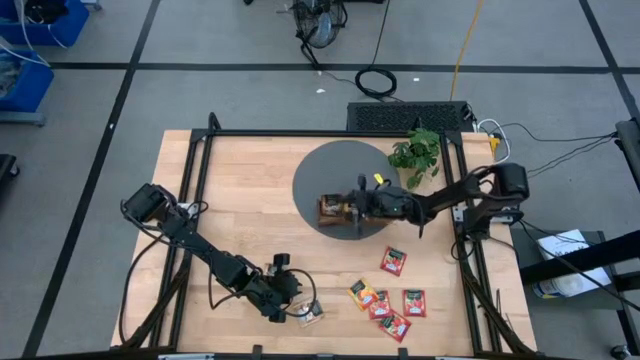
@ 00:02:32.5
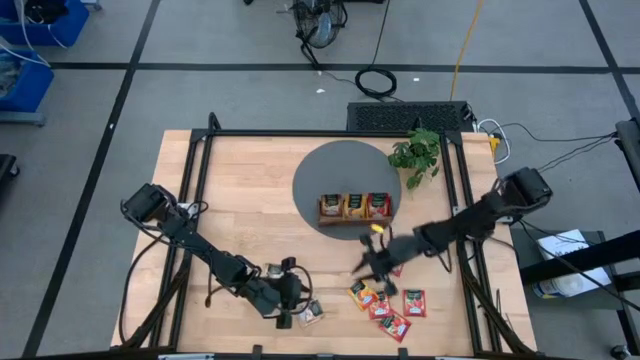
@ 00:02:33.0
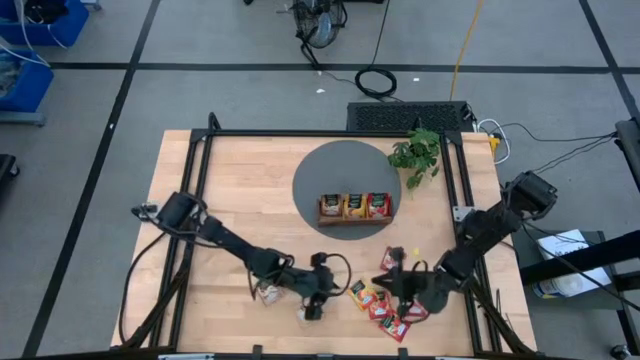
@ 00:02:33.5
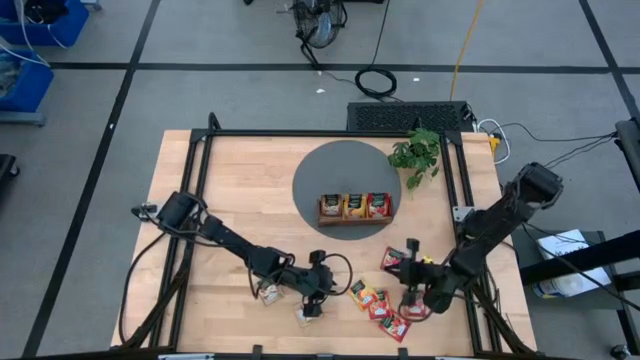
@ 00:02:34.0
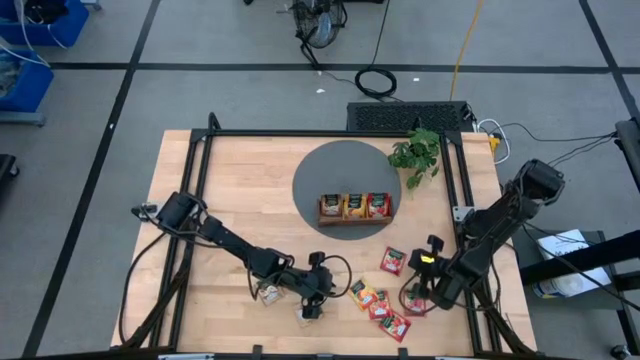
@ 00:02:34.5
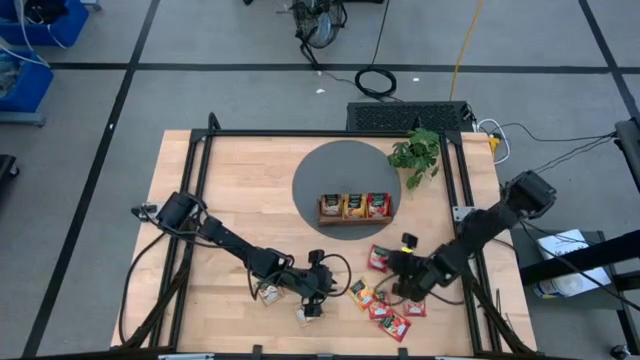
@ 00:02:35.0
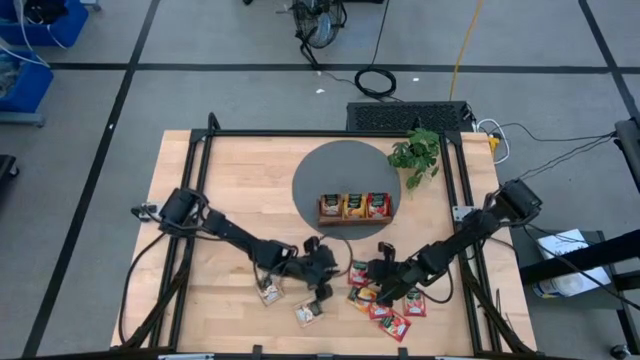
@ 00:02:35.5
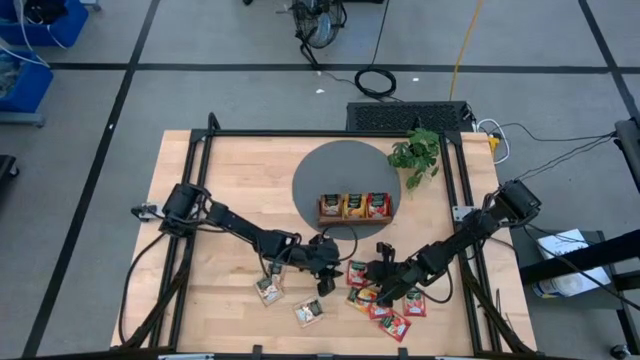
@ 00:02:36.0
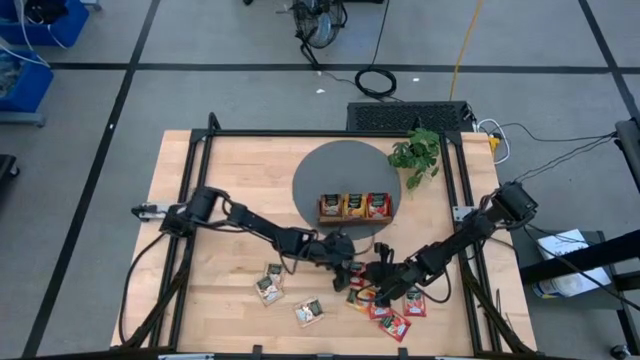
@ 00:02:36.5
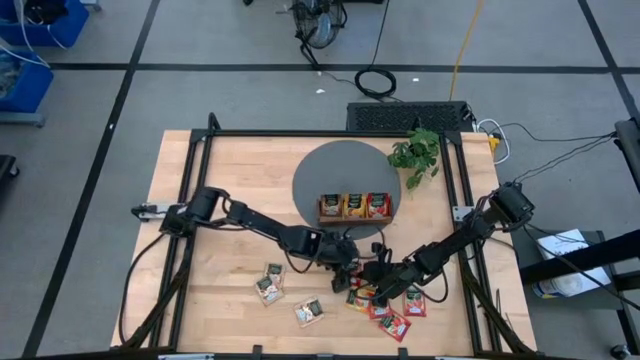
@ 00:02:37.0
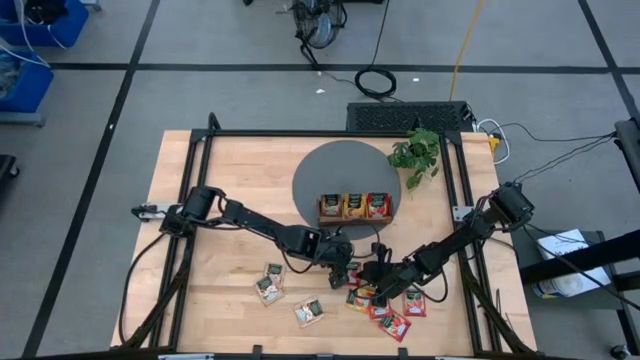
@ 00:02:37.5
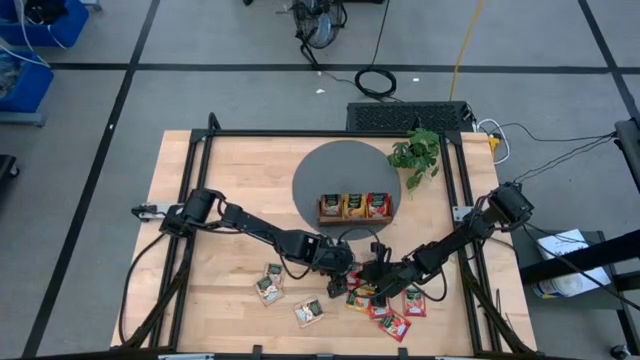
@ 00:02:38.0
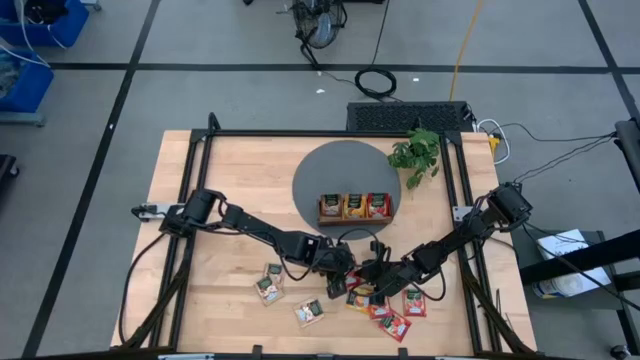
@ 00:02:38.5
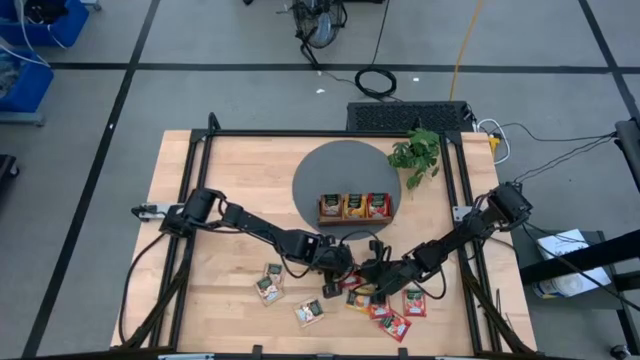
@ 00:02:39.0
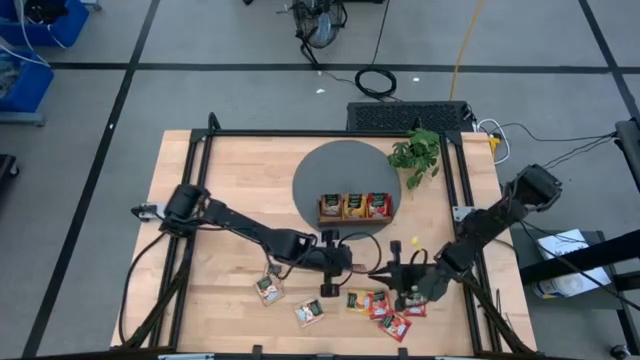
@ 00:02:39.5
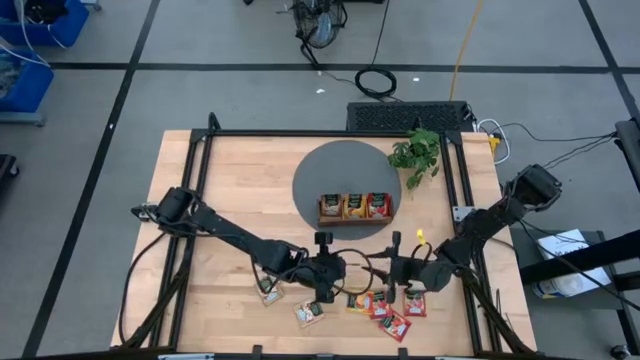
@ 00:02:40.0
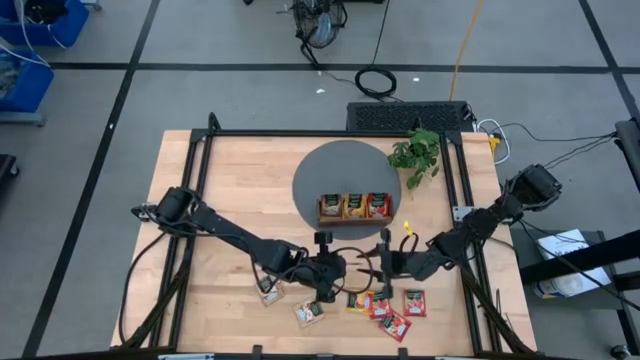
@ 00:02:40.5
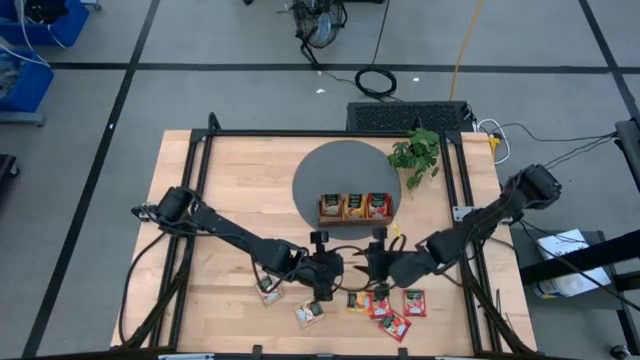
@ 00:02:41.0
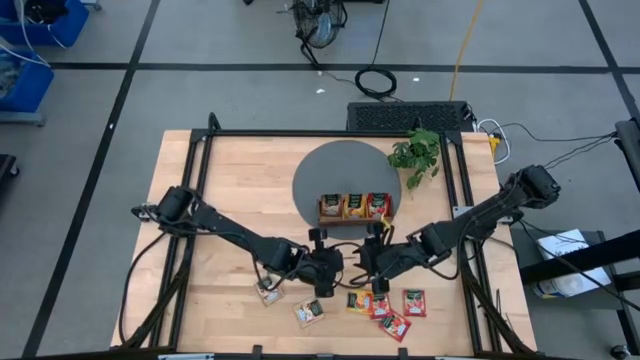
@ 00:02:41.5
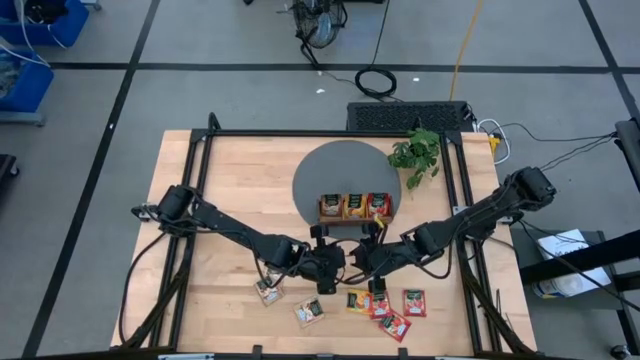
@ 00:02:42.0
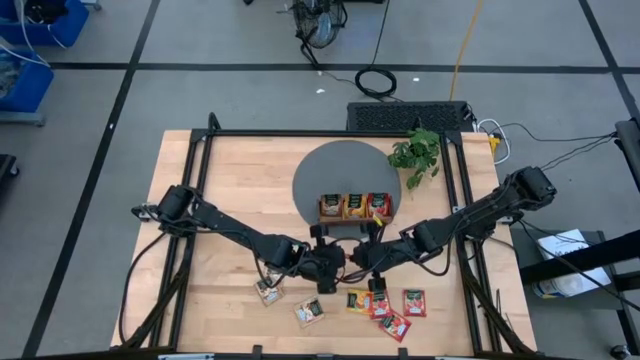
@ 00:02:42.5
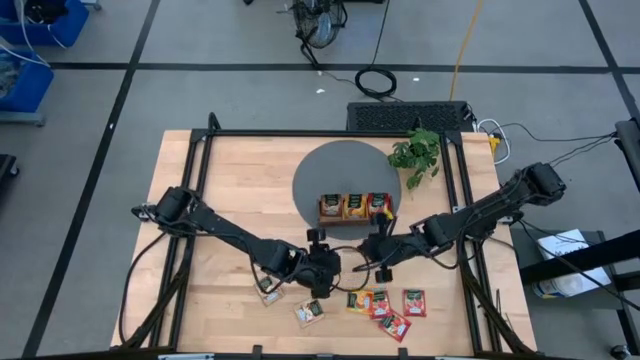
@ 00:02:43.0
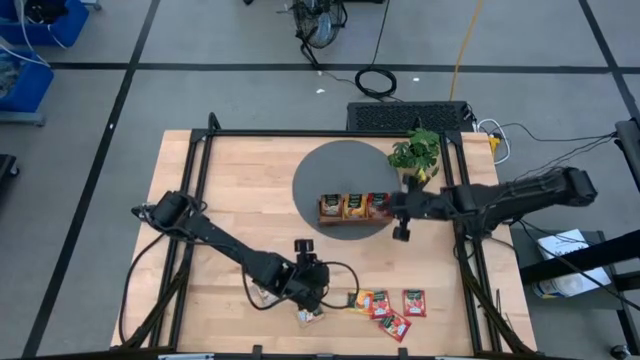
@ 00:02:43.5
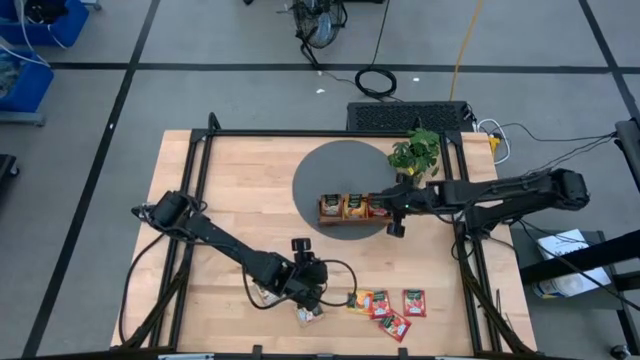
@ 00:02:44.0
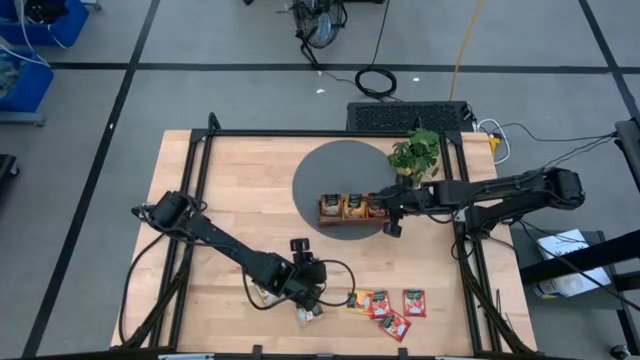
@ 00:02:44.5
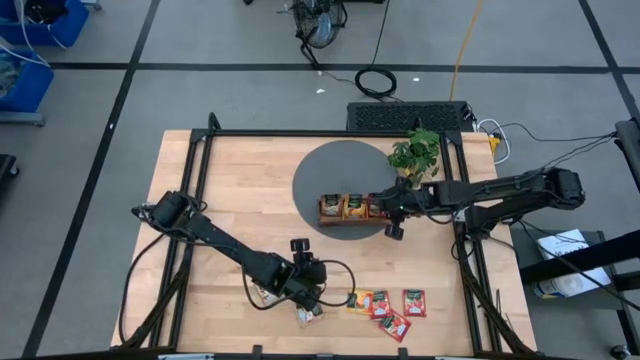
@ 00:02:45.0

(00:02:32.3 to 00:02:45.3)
Task: Pick & Place Tea
Put the red tea bag into the right section of the wooden organizer

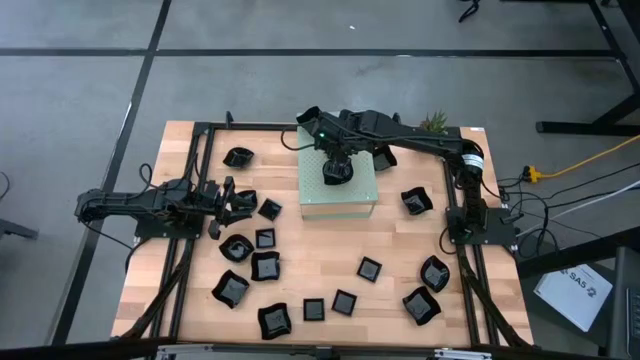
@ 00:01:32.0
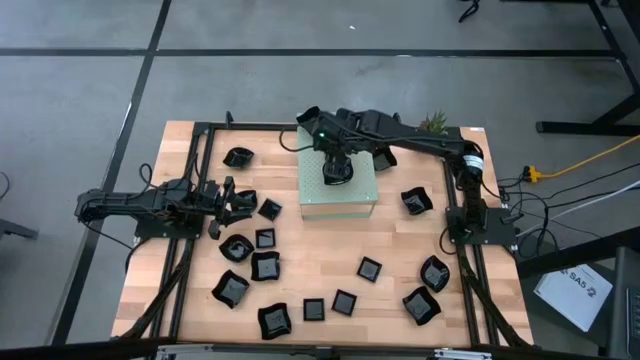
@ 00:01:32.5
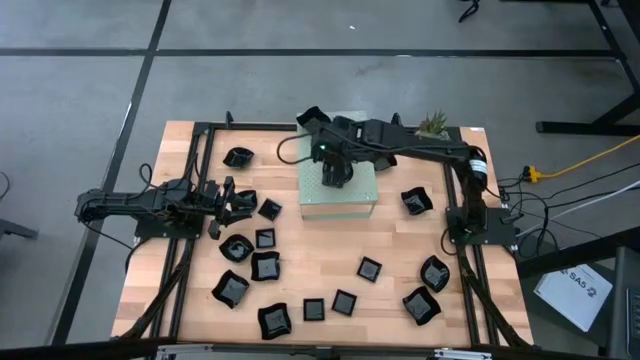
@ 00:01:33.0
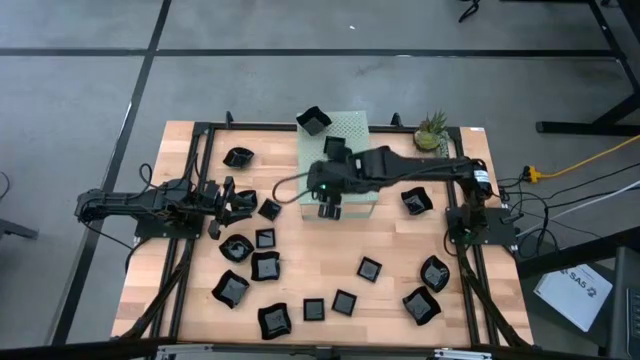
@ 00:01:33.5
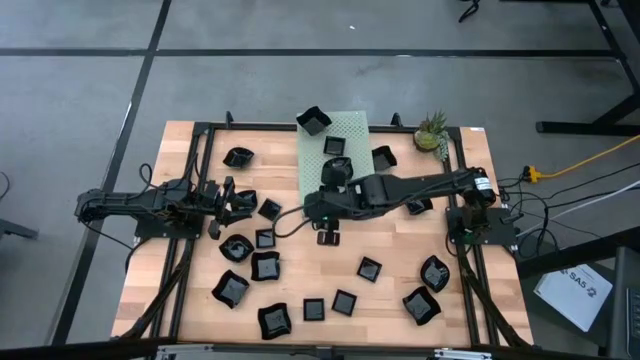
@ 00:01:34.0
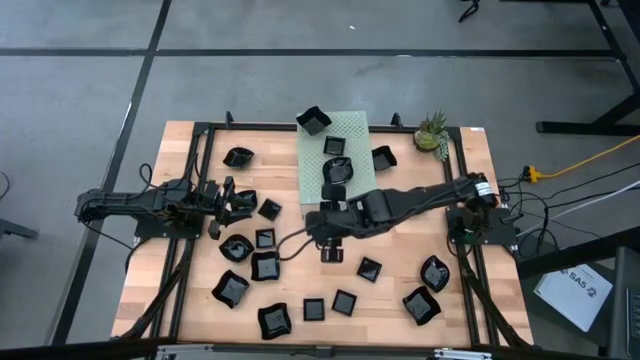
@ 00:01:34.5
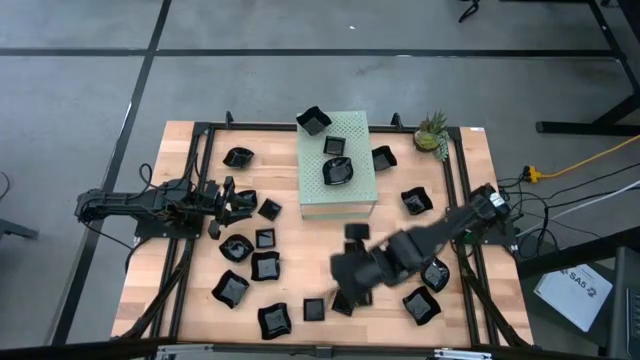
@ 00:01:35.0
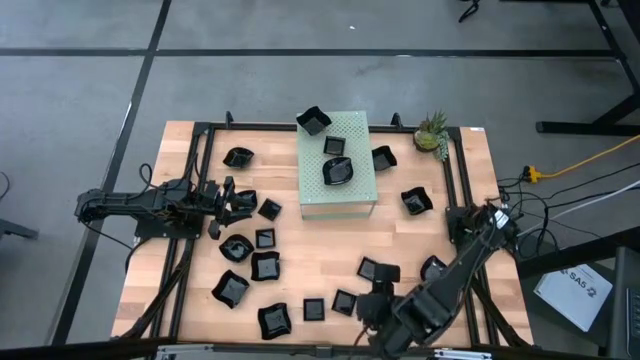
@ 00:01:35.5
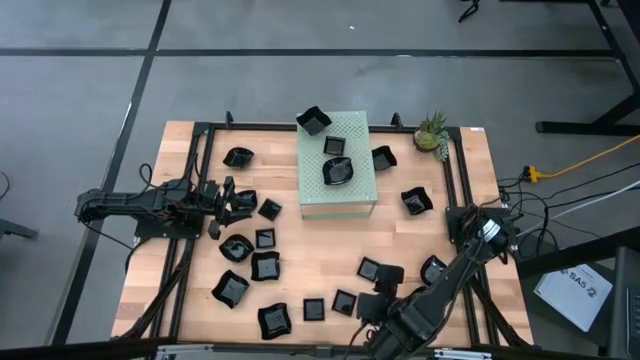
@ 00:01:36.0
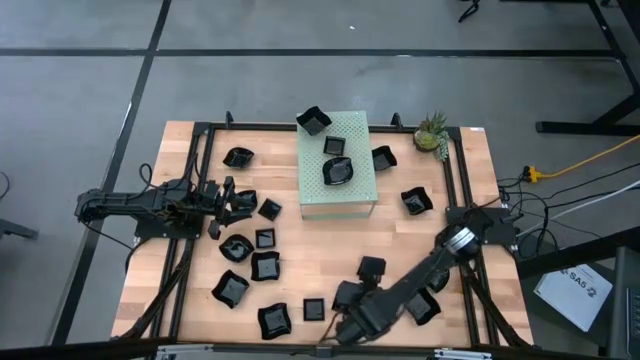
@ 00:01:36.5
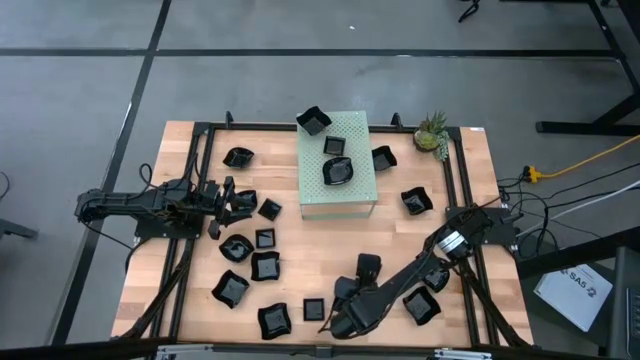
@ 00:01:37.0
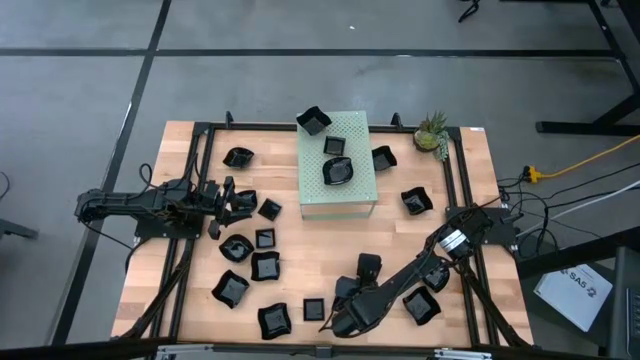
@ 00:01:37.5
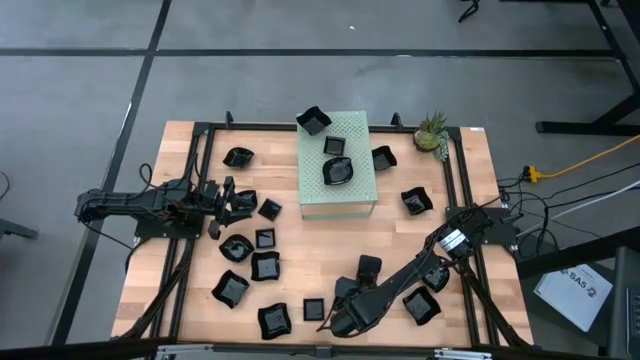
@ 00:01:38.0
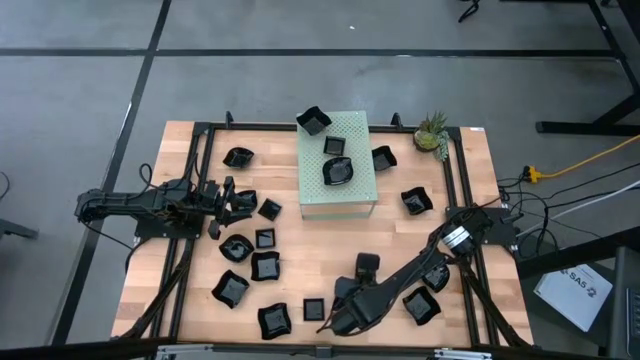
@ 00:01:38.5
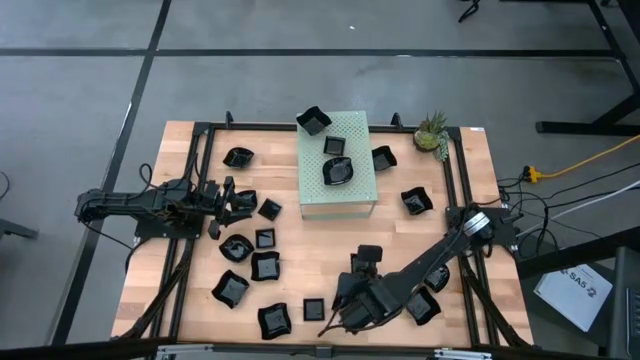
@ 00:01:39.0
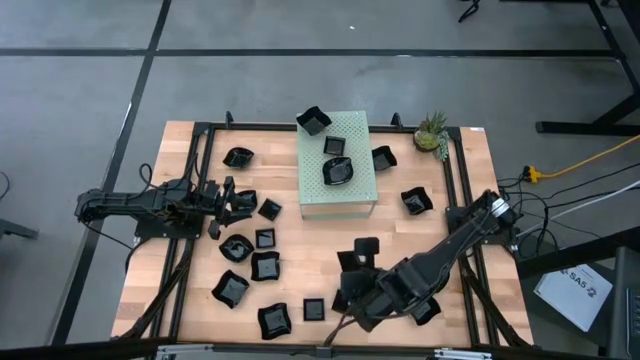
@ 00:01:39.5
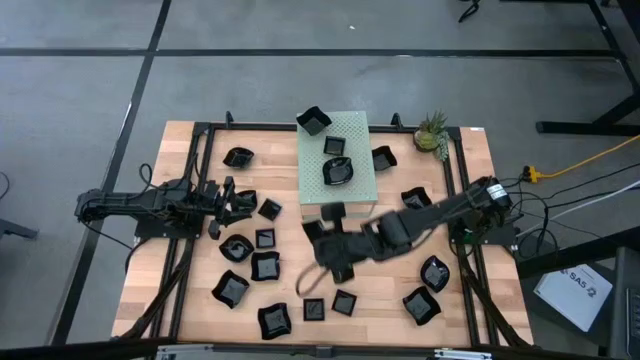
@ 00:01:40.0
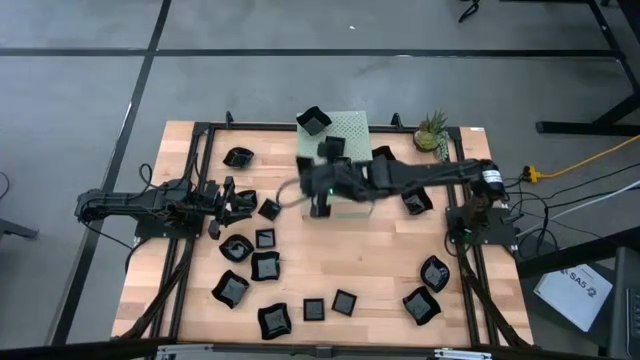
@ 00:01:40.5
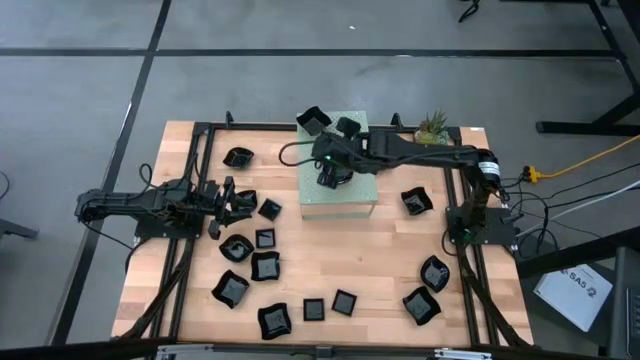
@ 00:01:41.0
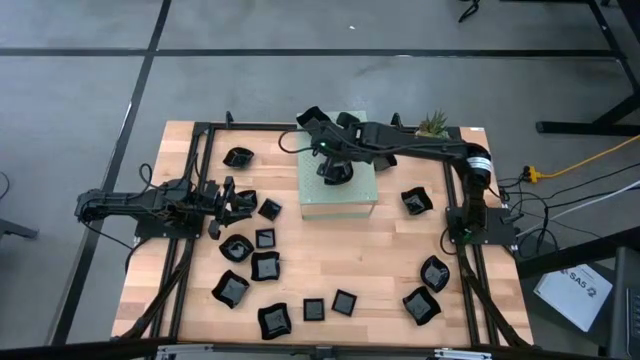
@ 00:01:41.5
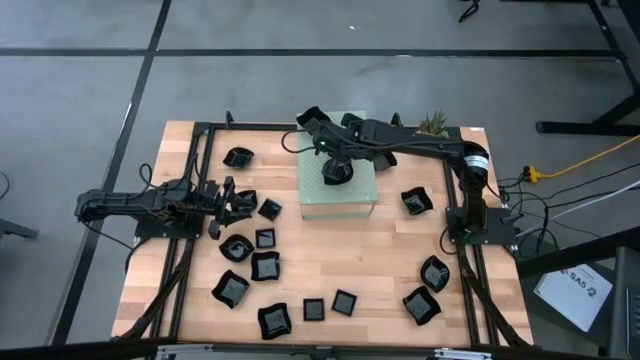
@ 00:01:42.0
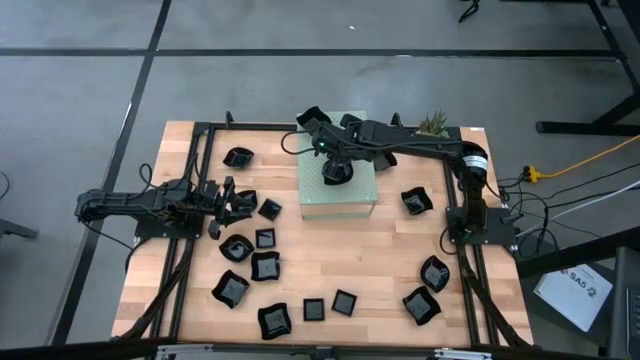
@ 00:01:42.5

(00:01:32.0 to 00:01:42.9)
Task: Pick & Place Mini shaped plates
Stack the black square plate on top of the black square plate on the shelf
